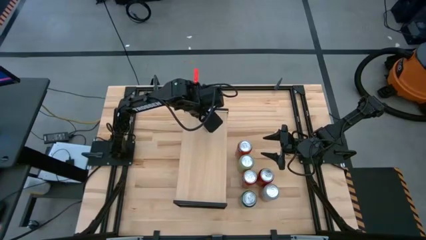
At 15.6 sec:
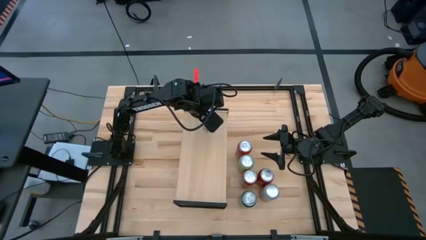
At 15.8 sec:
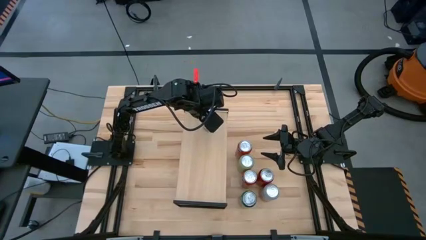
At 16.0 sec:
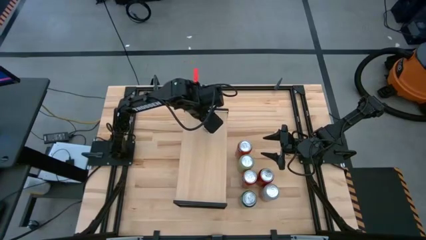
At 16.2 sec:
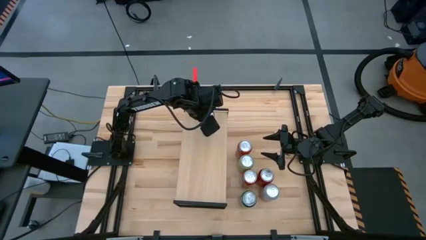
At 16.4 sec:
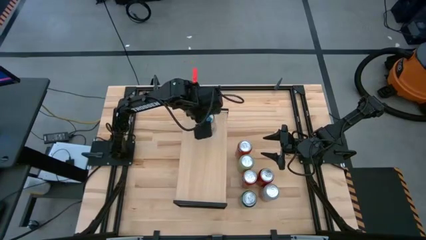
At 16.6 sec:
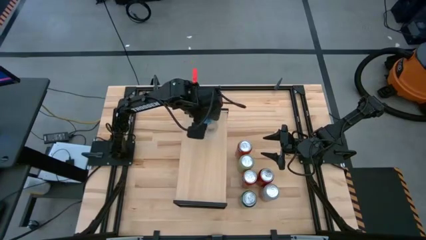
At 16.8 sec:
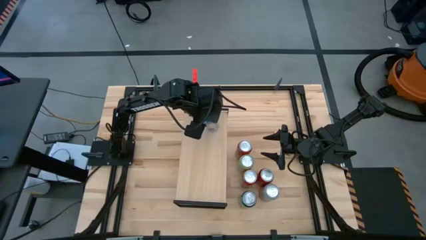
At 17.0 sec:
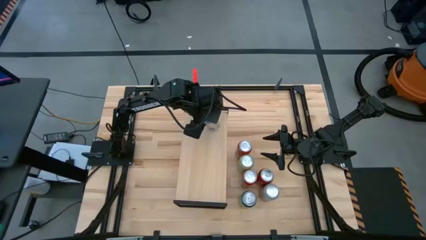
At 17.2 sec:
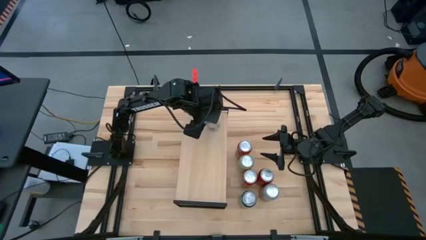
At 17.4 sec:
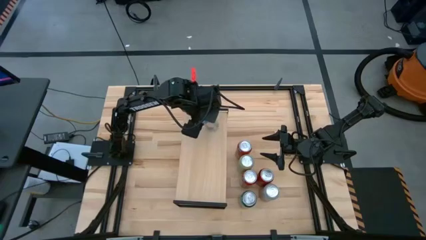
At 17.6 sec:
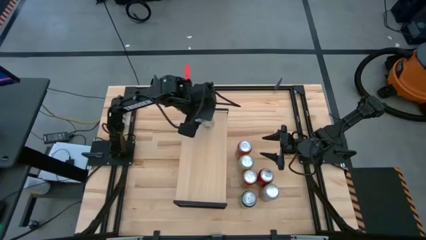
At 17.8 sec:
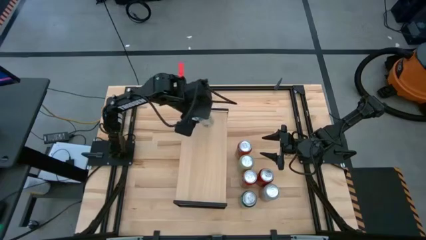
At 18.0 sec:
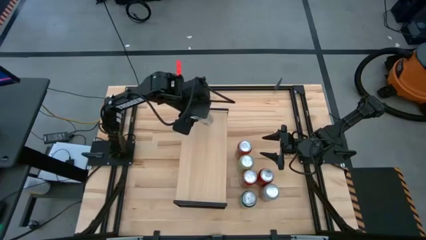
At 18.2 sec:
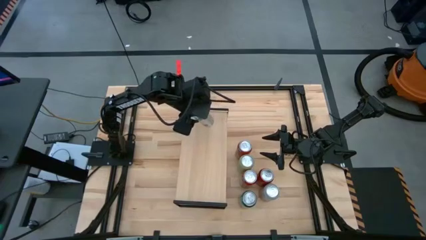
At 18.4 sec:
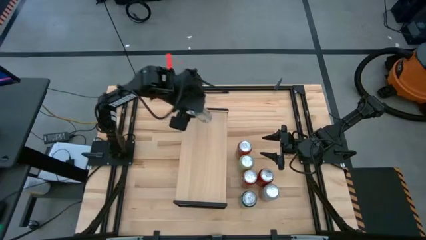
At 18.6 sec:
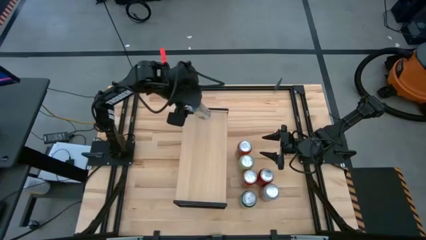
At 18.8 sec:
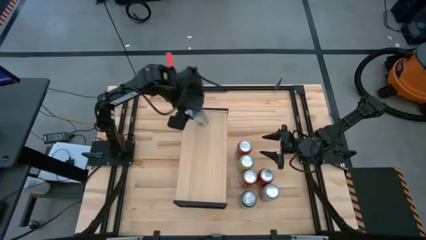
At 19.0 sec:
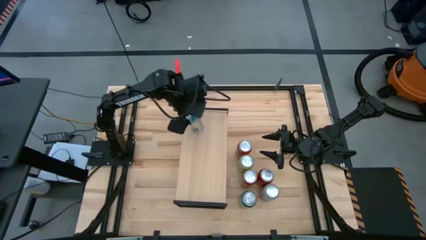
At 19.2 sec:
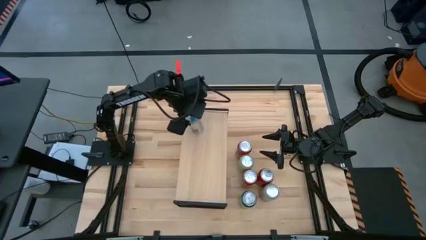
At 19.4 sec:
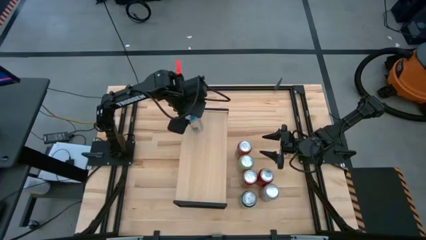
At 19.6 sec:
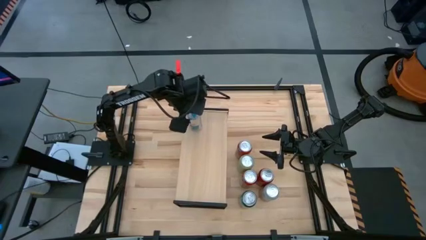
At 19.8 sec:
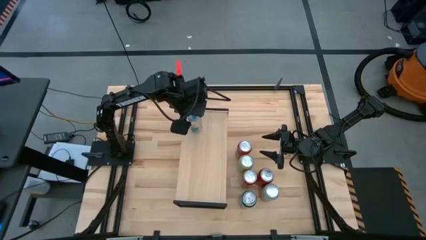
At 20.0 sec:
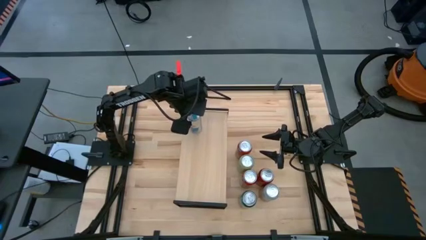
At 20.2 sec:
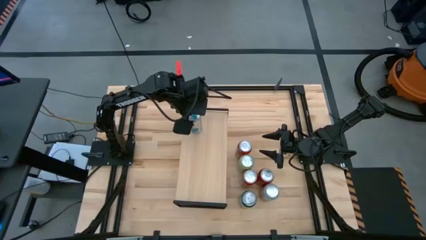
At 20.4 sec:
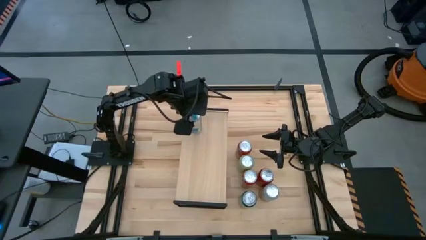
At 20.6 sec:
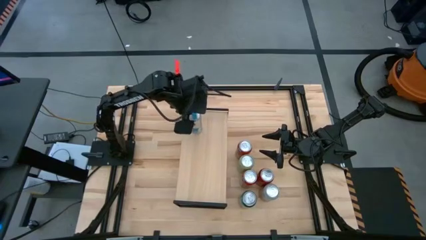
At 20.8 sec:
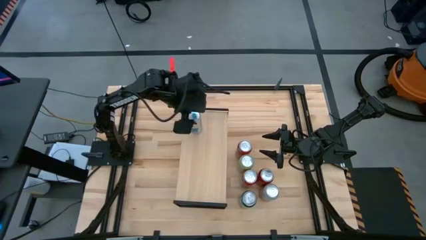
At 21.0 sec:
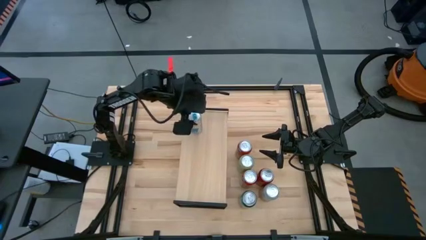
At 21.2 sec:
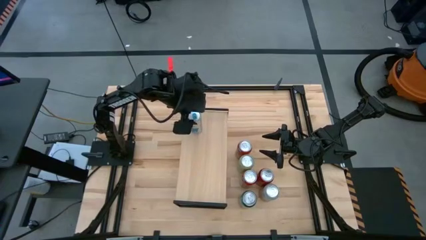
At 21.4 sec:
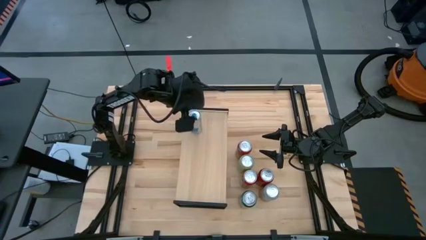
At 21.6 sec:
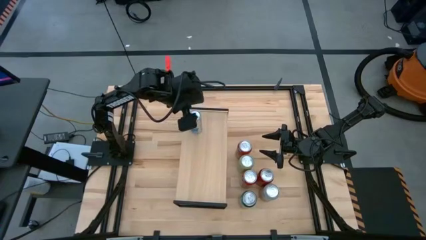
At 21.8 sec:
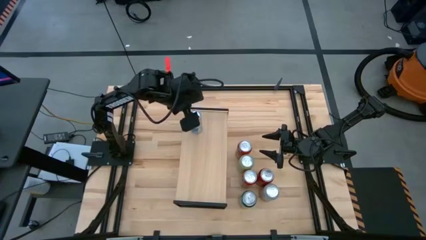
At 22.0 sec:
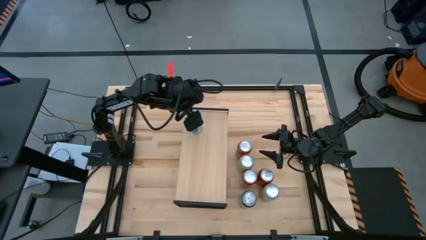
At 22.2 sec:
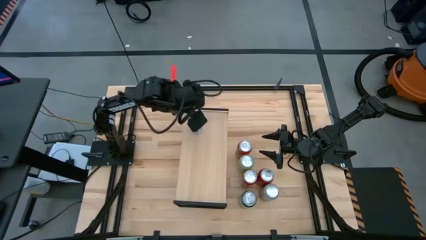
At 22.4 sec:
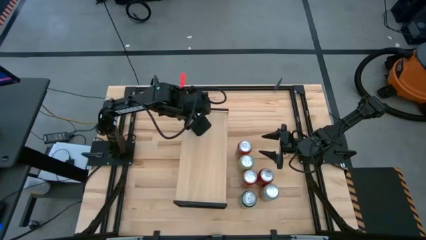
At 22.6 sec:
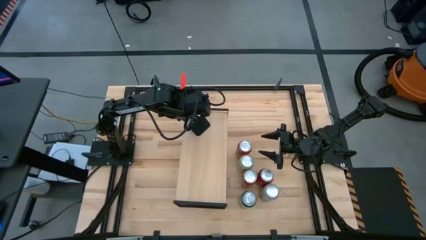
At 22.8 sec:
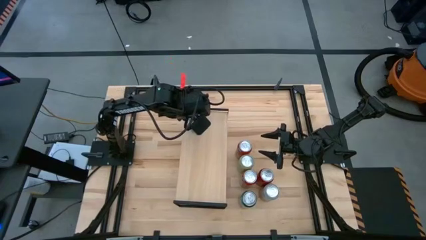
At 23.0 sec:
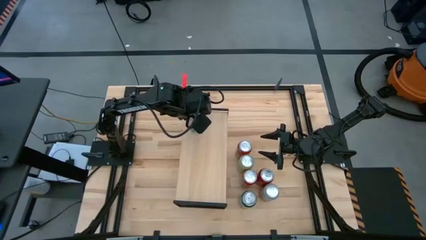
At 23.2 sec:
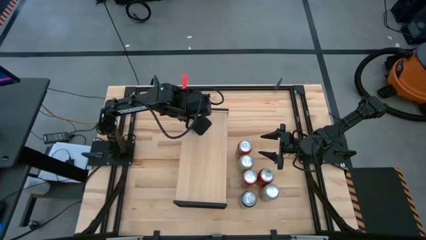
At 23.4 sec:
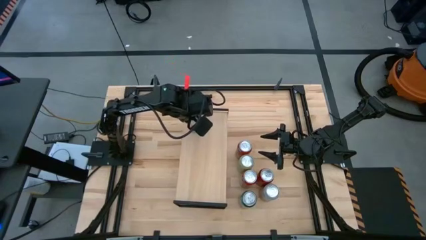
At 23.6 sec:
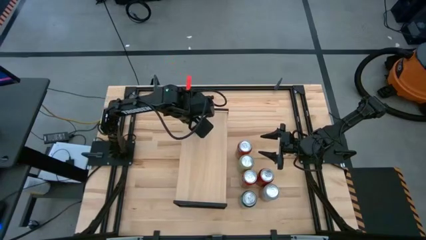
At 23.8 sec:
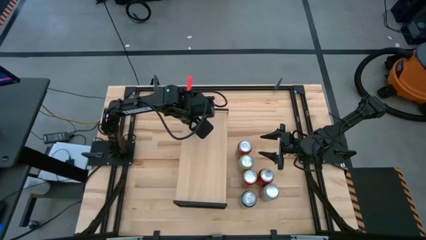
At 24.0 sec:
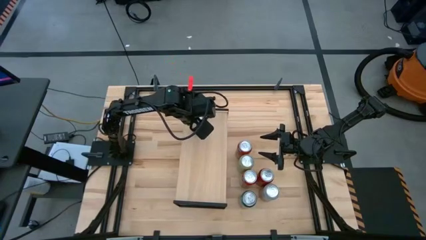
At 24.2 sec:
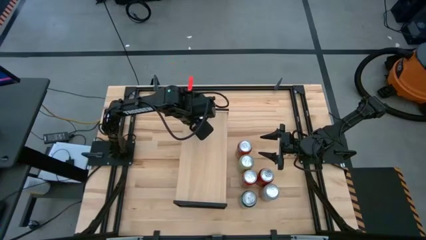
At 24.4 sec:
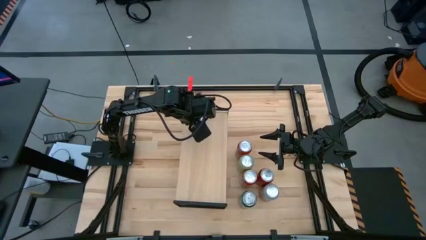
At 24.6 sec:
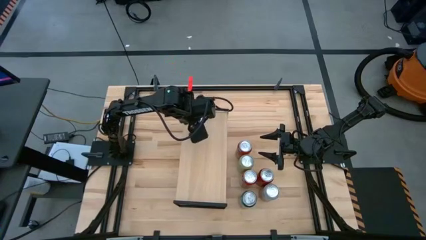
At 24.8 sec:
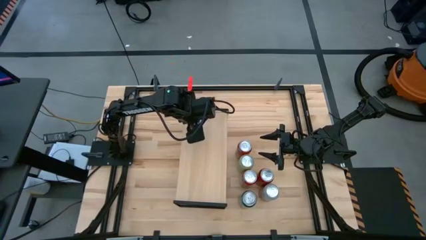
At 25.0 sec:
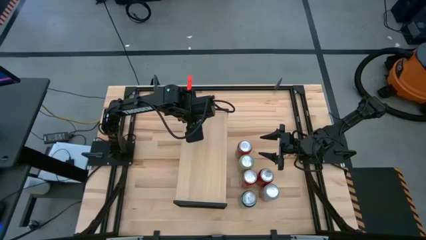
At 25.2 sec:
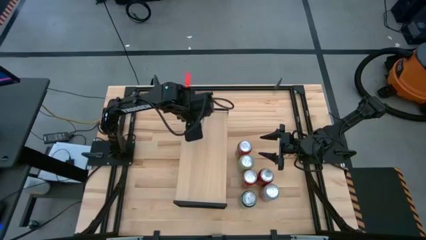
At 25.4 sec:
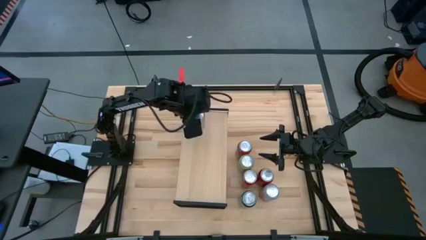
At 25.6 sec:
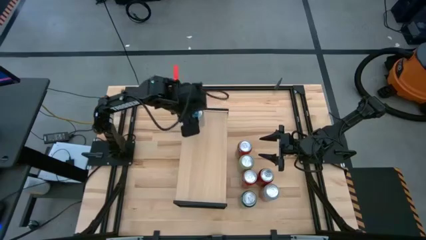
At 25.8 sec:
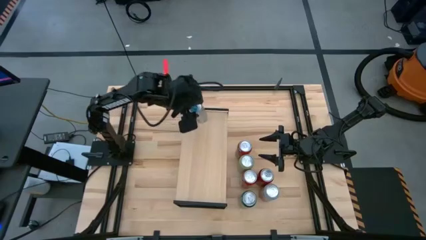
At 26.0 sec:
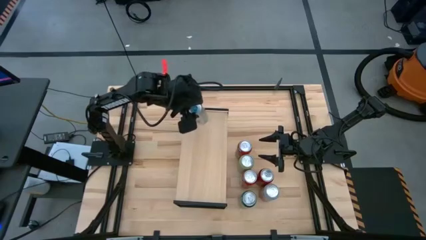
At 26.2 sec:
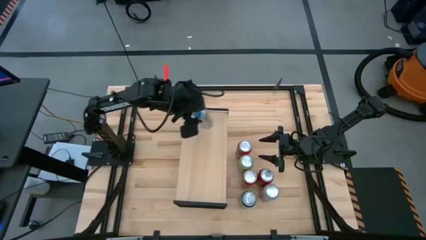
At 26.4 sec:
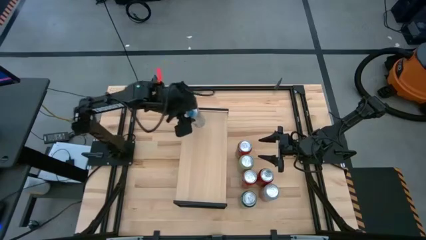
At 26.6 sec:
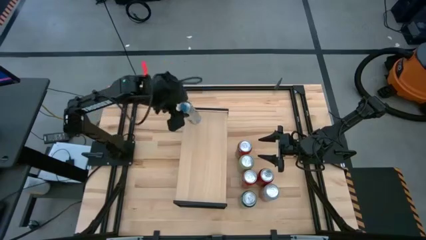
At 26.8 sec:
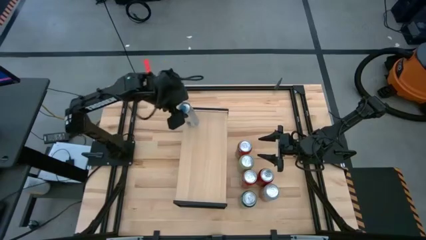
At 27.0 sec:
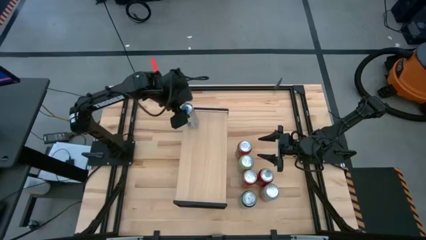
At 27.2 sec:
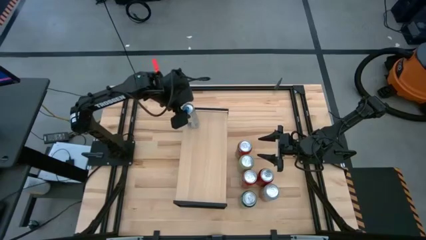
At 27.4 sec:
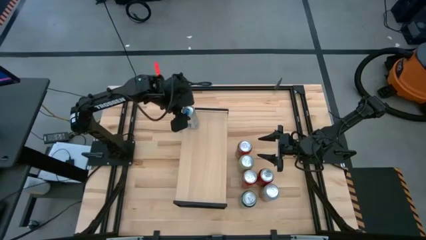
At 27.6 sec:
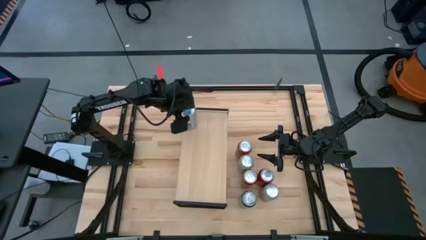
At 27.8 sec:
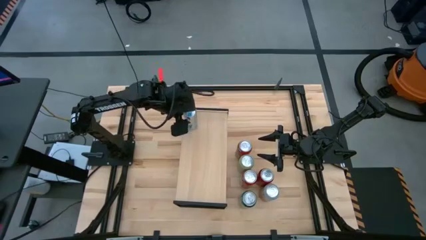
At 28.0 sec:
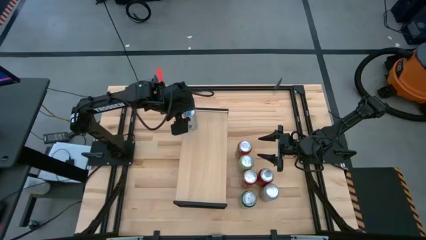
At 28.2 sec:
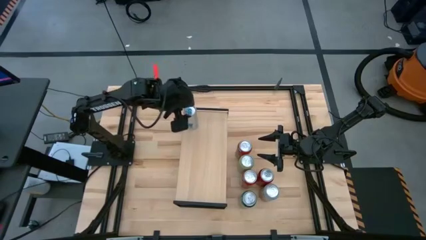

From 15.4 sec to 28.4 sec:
Task: Place canned beverage on shelf
Put the blue soda can on the shelf
